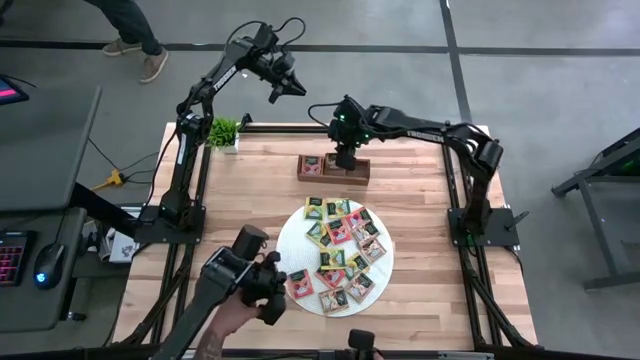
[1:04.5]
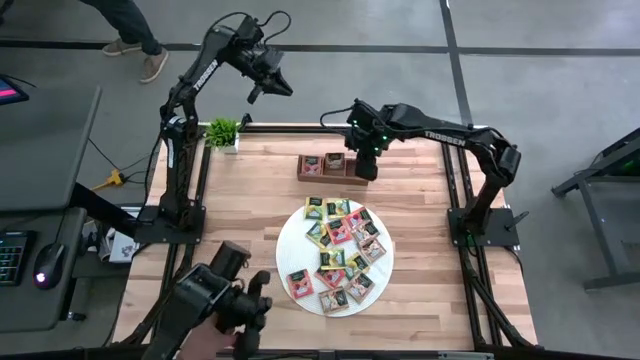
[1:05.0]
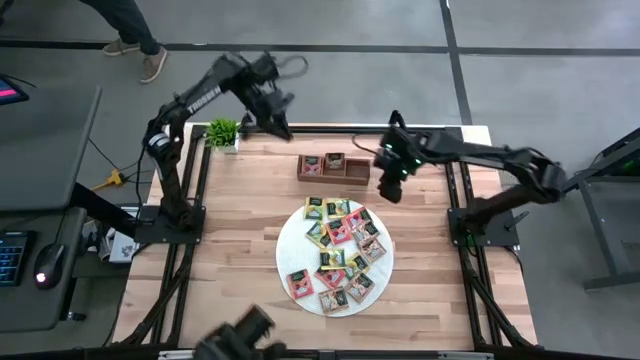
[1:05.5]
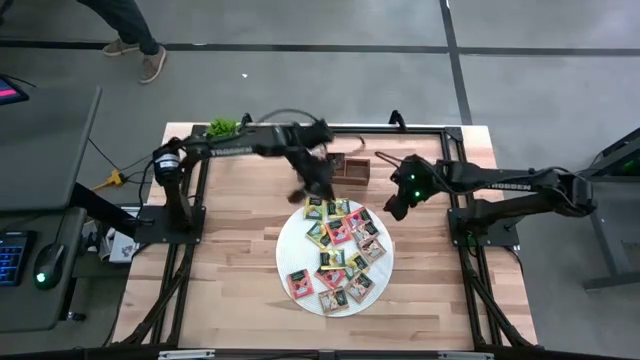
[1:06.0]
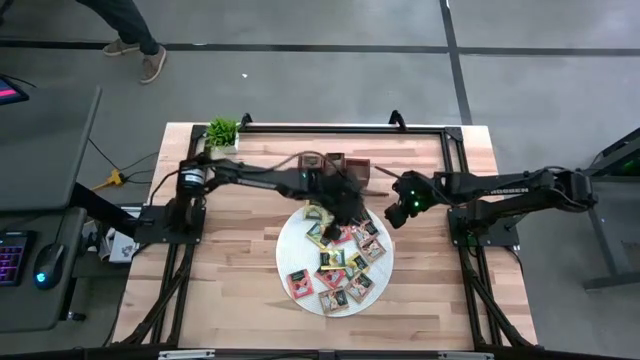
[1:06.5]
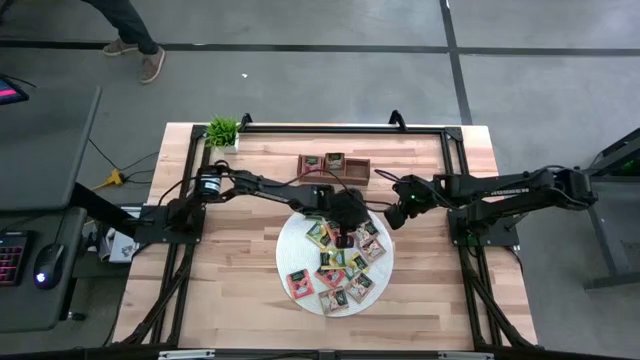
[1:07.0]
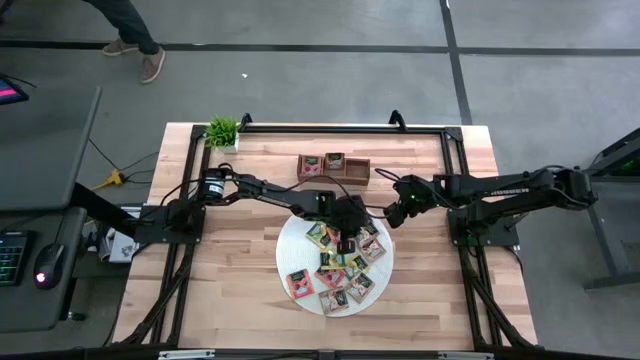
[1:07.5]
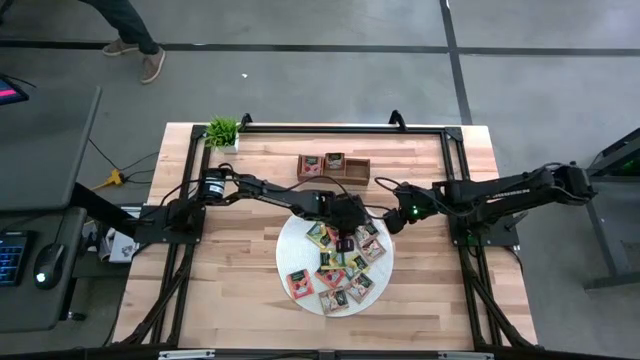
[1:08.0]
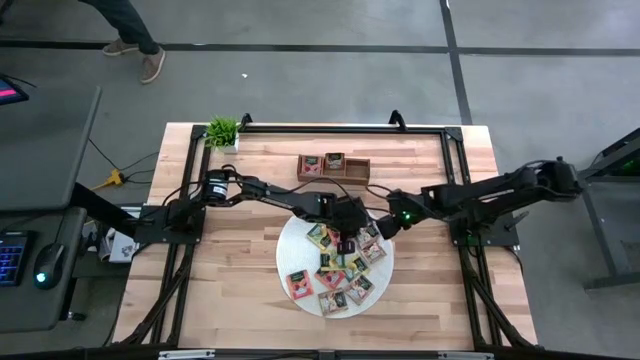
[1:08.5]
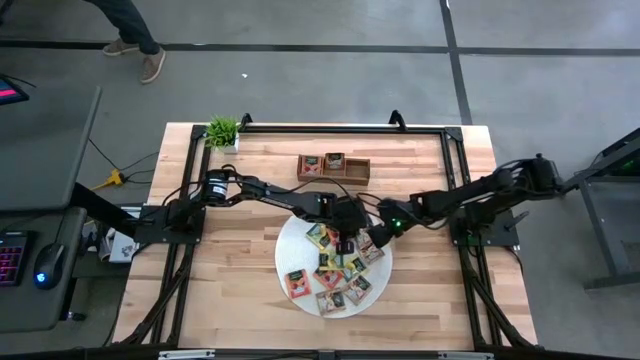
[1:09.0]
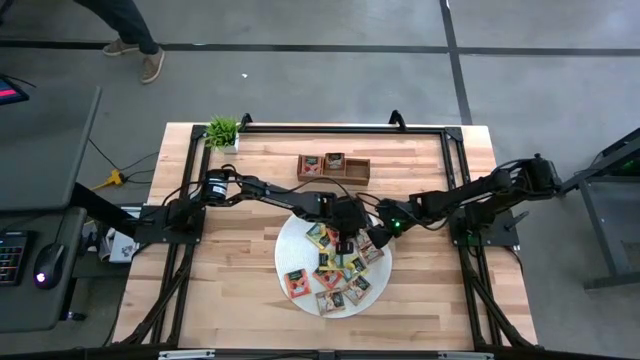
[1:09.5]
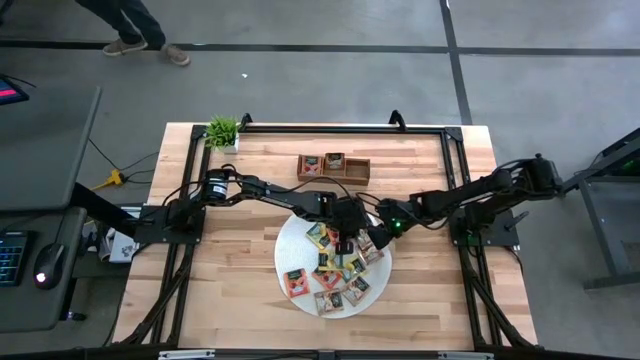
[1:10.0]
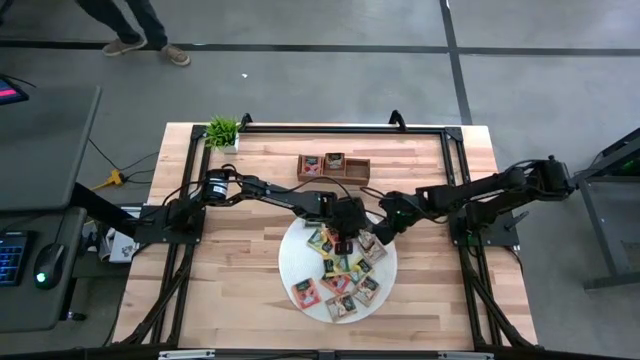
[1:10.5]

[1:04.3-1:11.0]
Task: Pick & Place Tea
Put the brown tea bag into the middle section of the wooden organizer

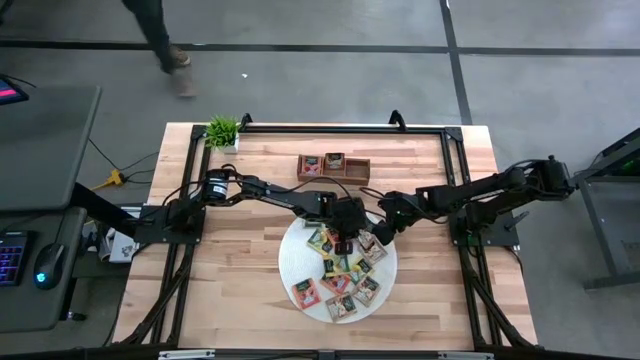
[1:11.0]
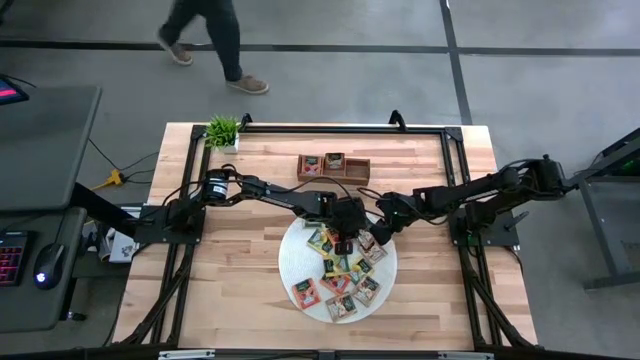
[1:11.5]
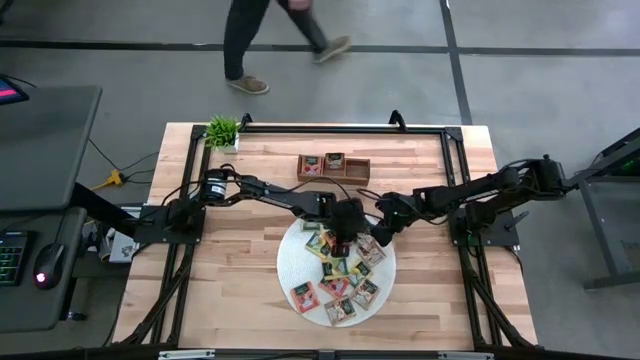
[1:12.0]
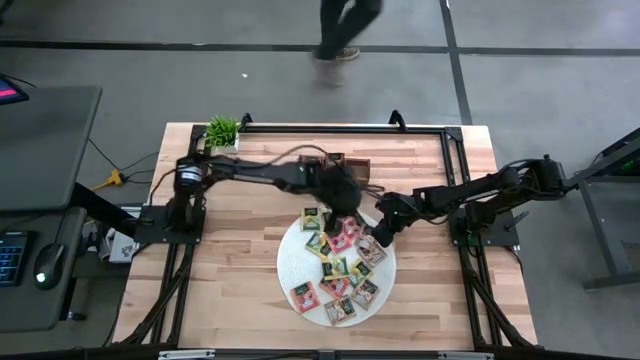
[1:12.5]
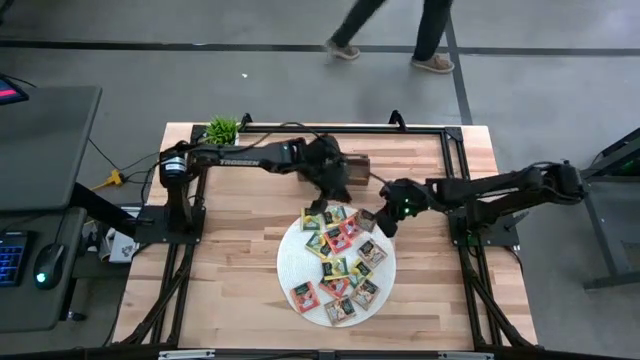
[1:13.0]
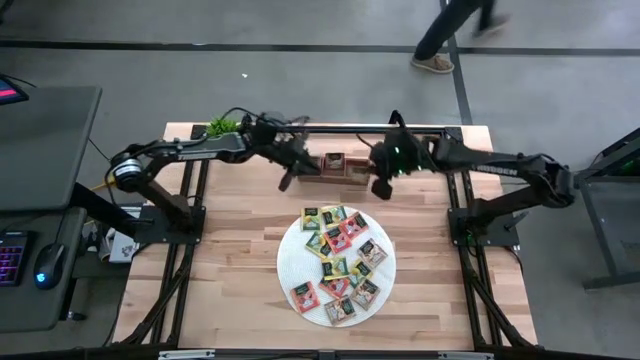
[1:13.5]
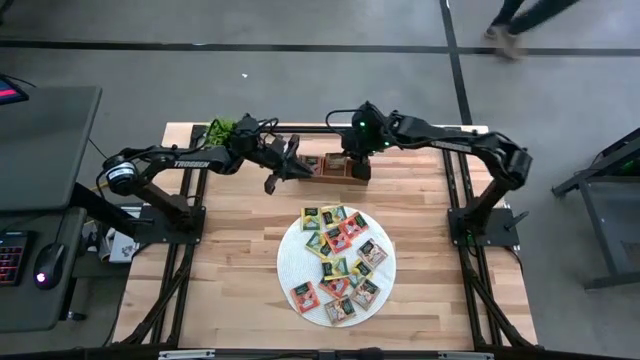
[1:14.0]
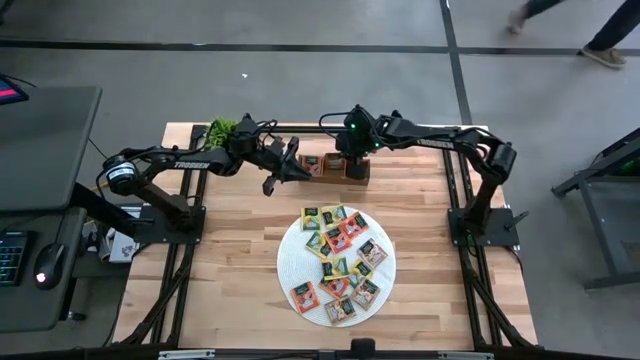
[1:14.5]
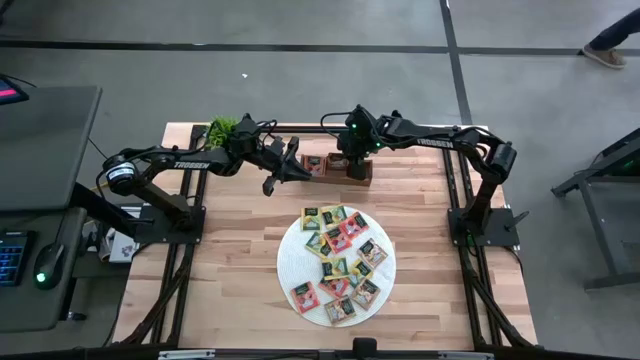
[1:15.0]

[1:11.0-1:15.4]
Put the brown tea bag into the middle section of the wooden organizer

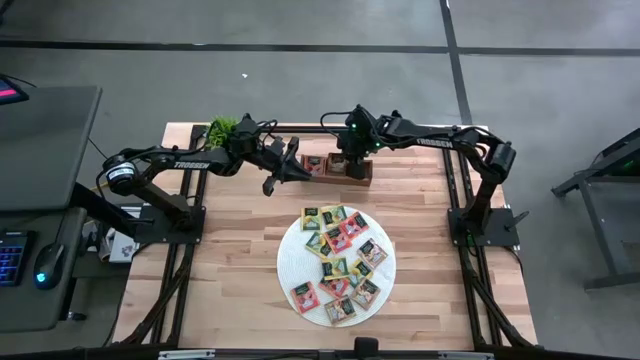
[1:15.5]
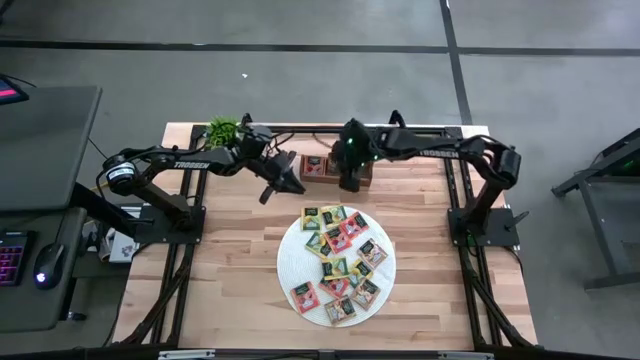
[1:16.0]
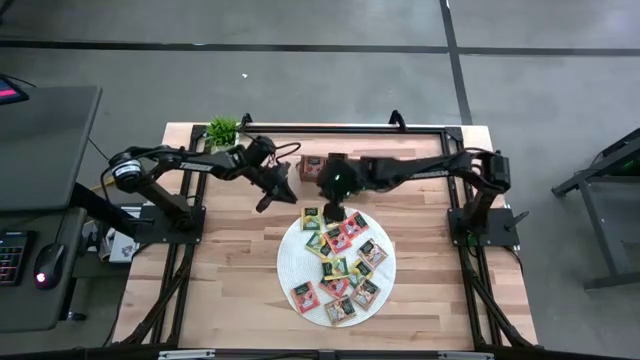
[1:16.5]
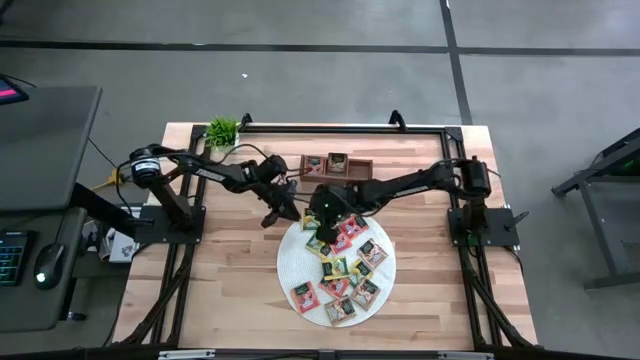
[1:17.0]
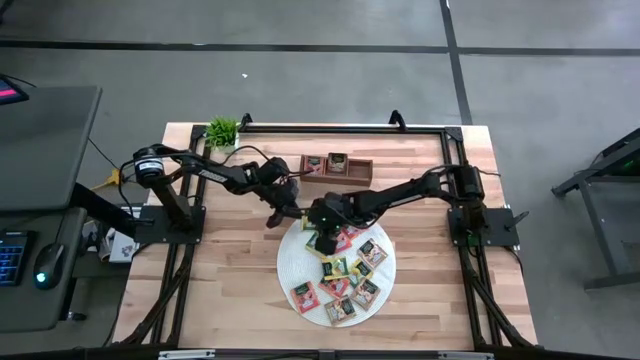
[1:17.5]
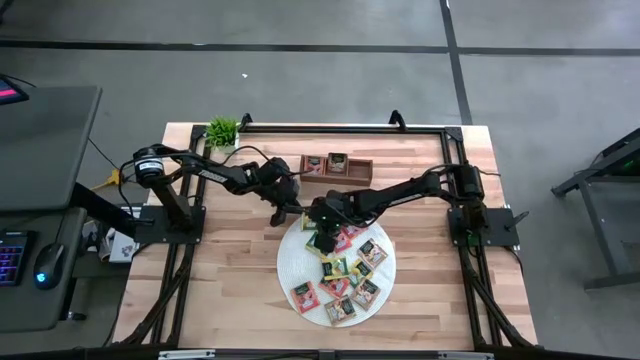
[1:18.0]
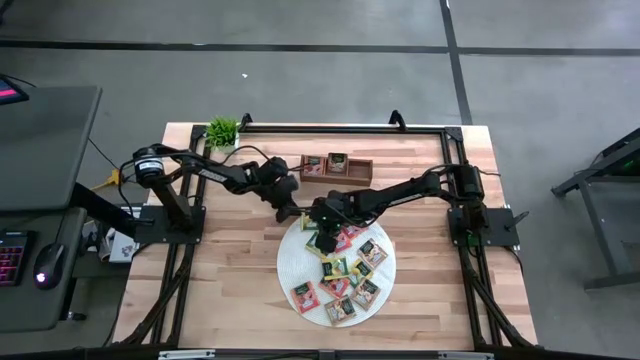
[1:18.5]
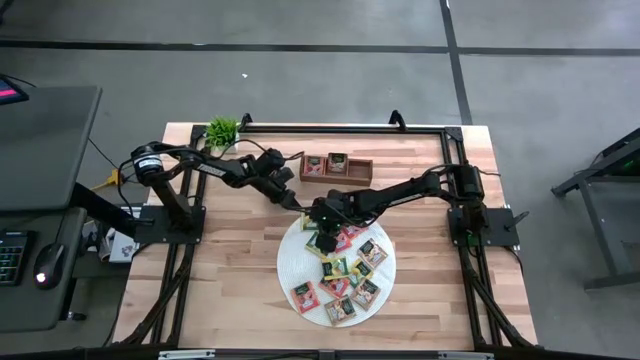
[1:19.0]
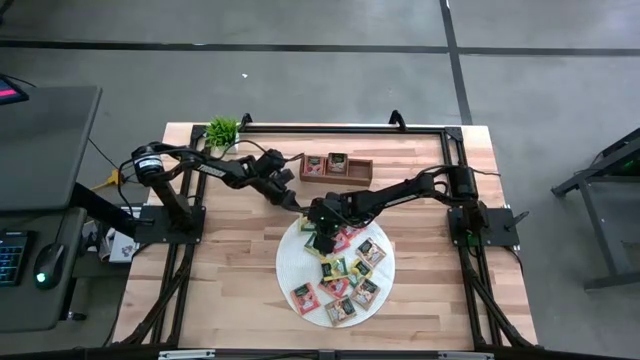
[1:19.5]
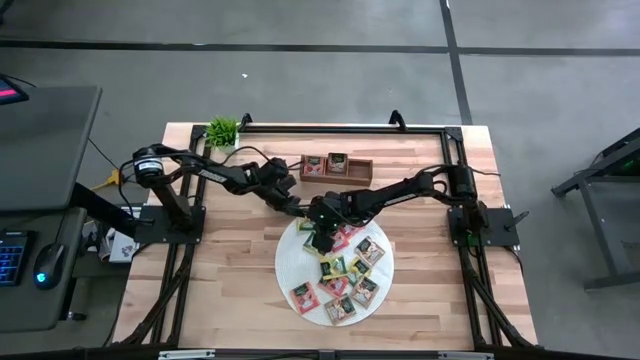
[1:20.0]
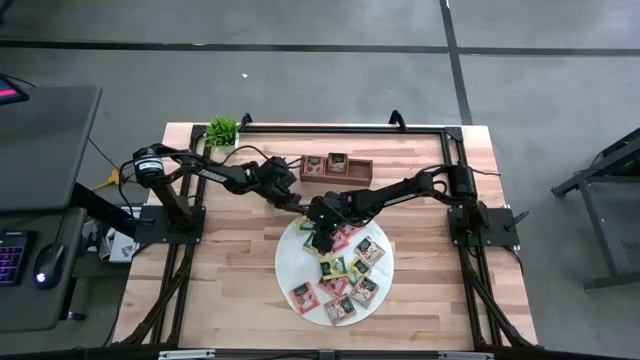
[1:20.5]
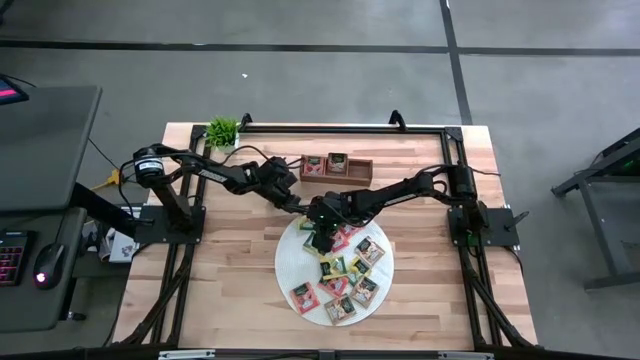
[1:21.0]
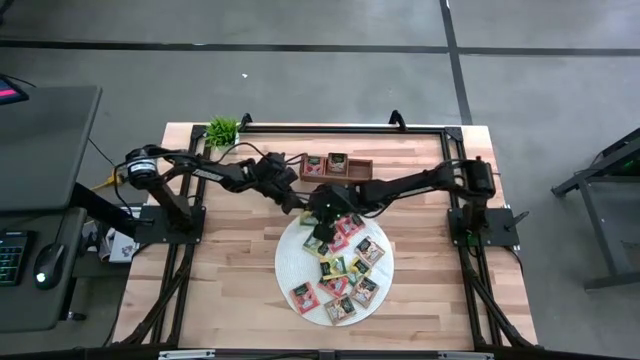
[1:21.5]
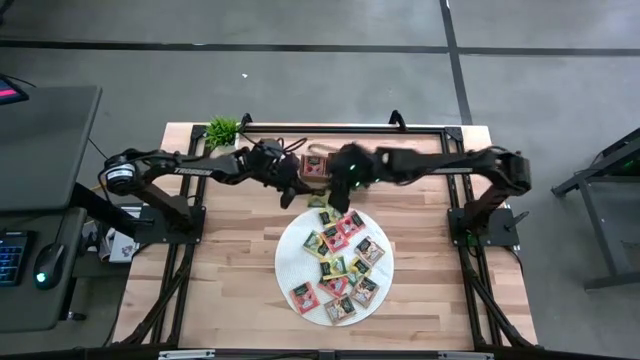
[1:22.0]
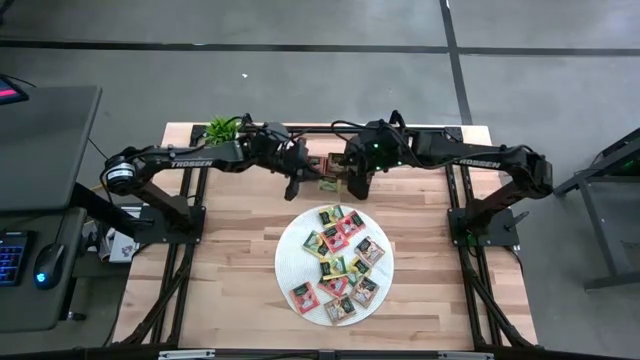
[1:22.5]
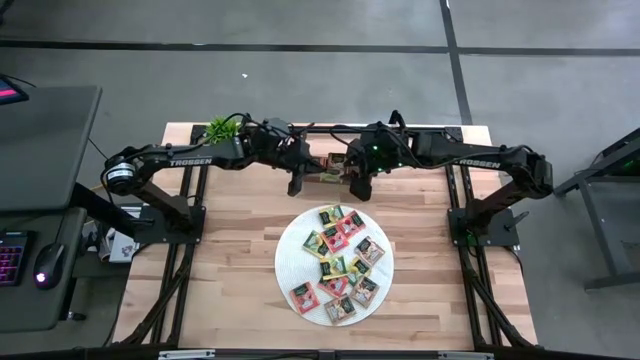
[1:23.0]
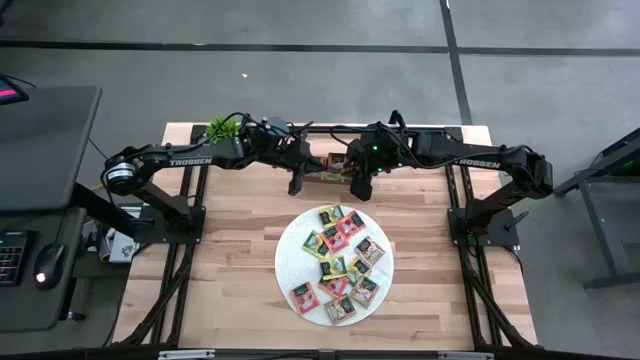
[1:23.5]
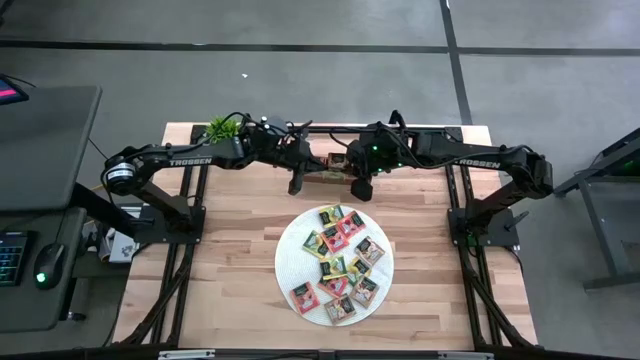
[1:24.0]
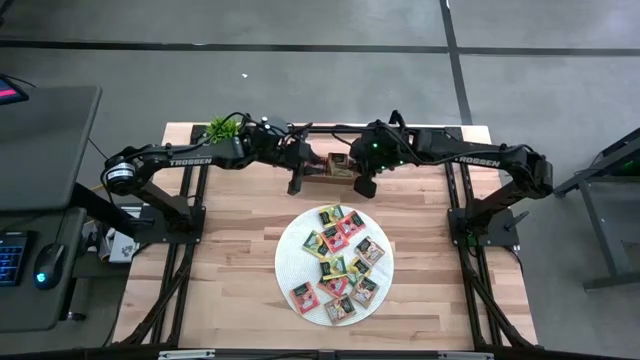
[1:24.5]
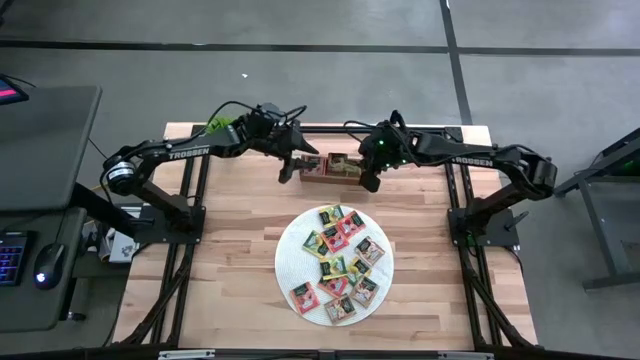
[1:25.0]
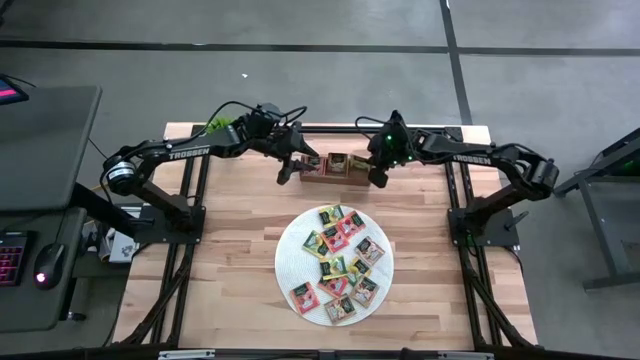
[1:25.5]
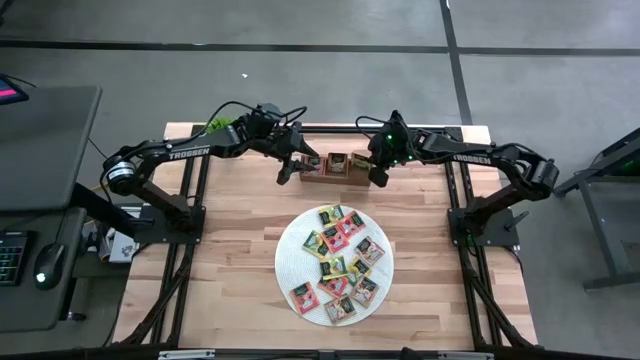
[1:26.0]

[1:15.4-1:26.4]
Put the yellow tea bag into the right section of the wooden organizer
